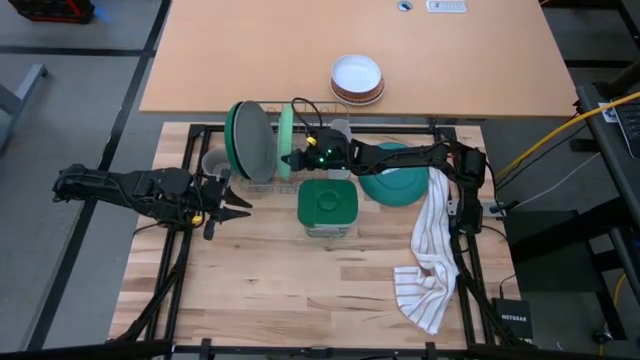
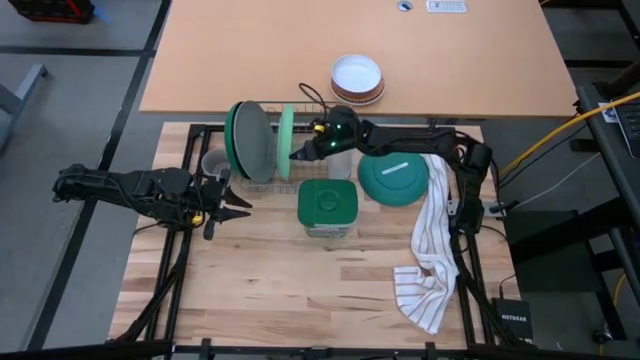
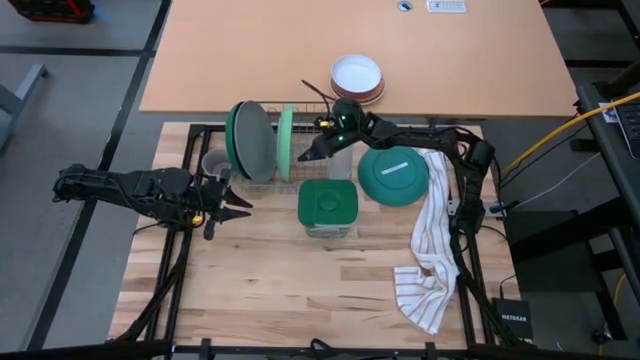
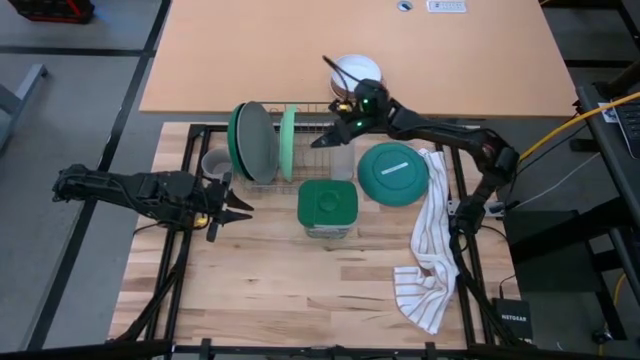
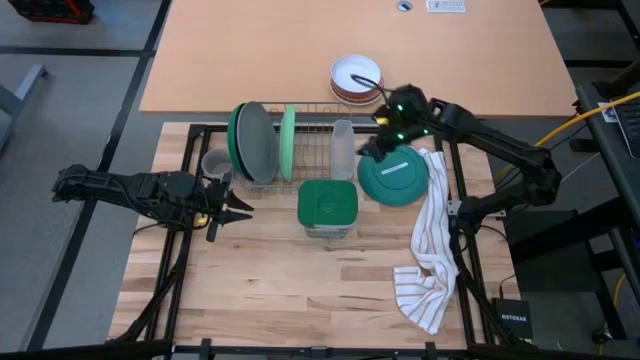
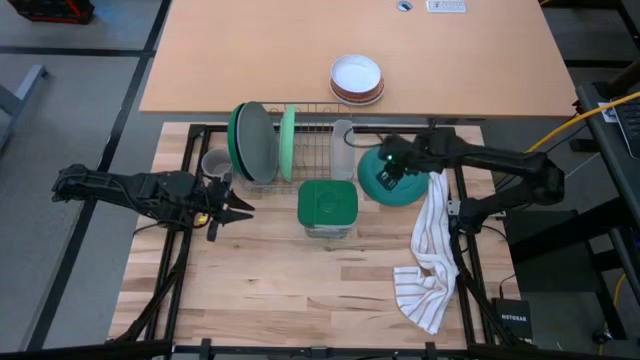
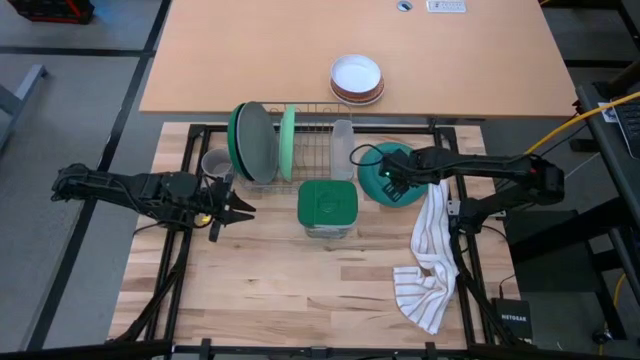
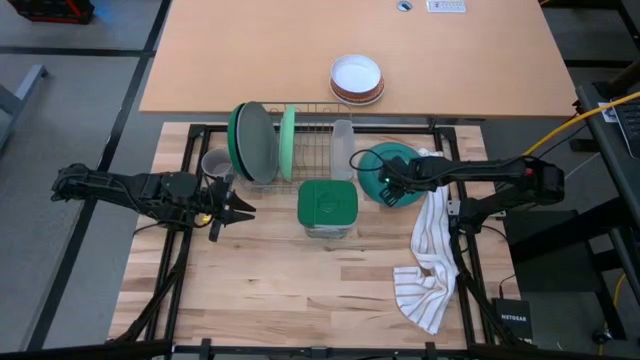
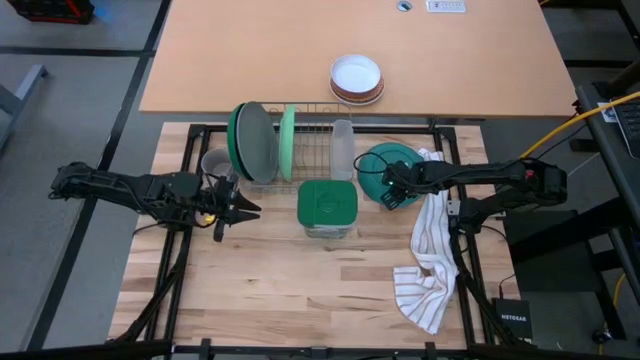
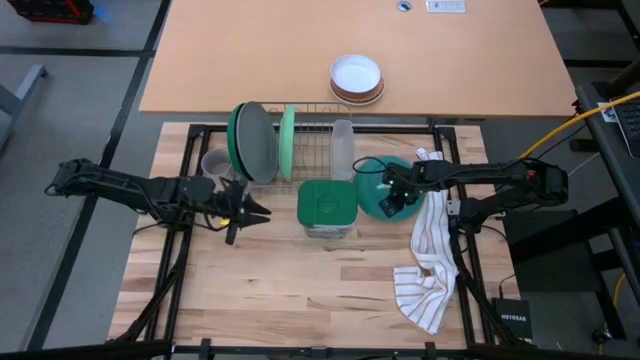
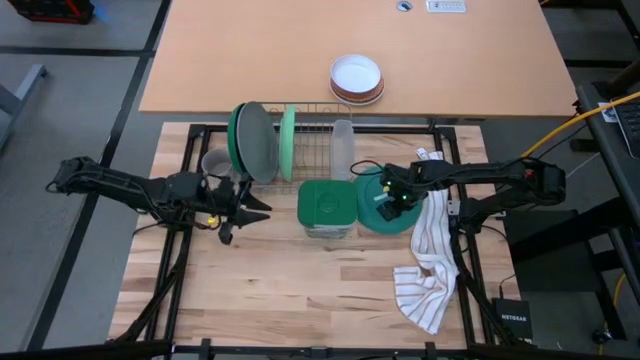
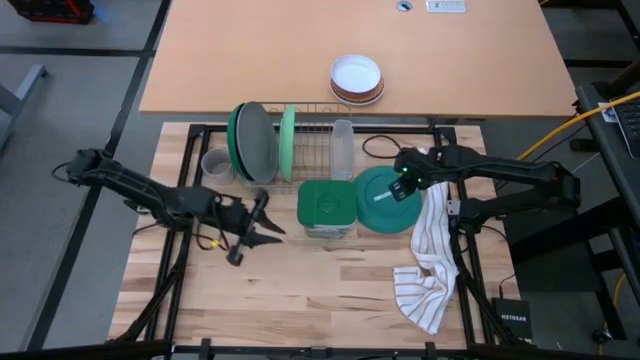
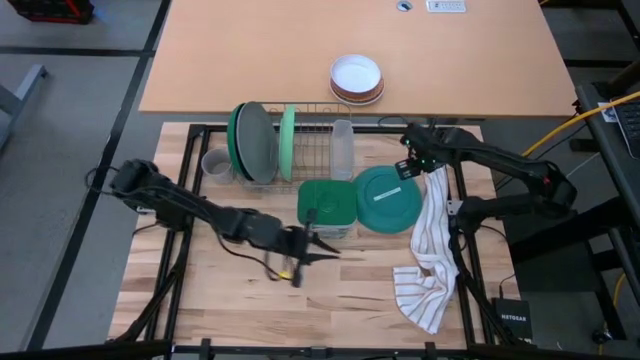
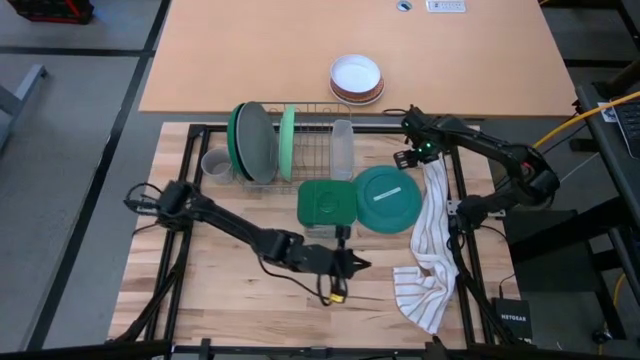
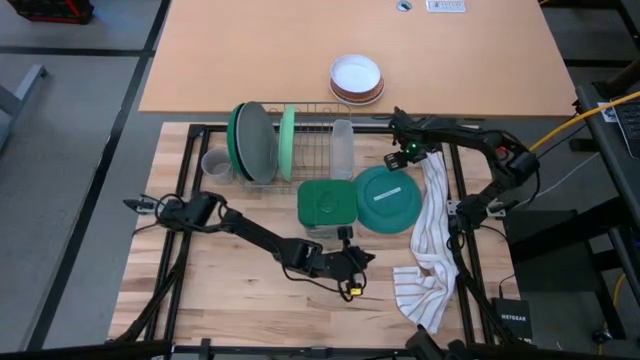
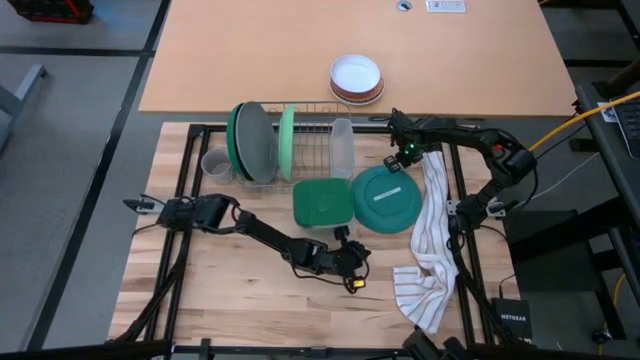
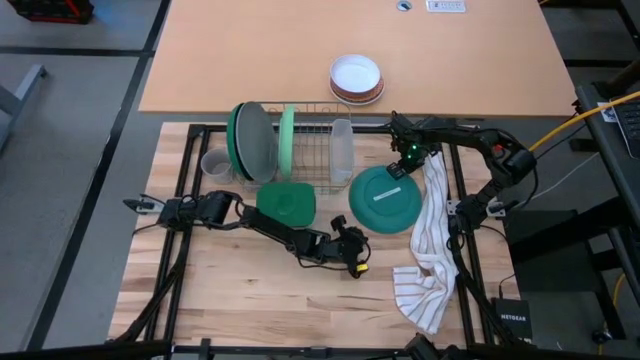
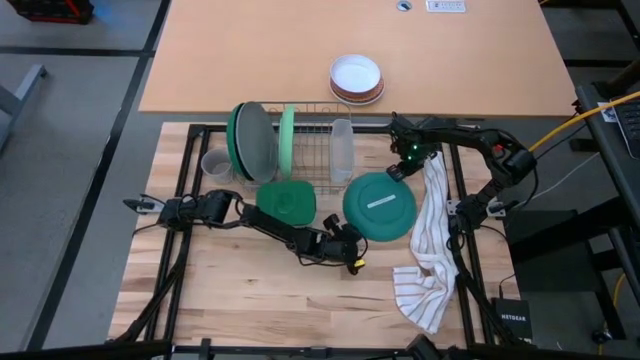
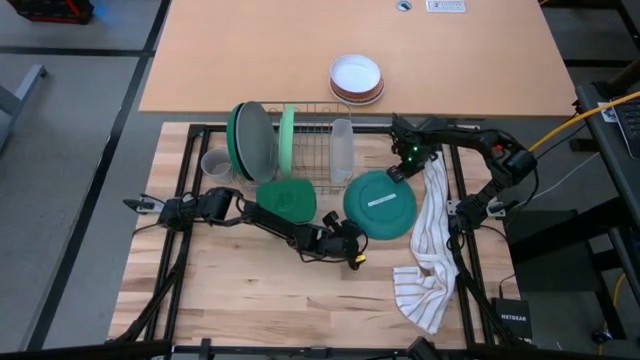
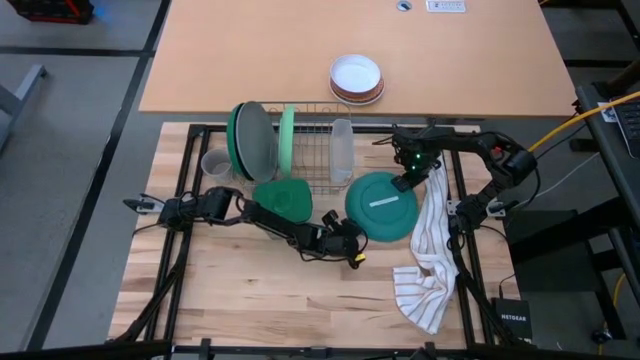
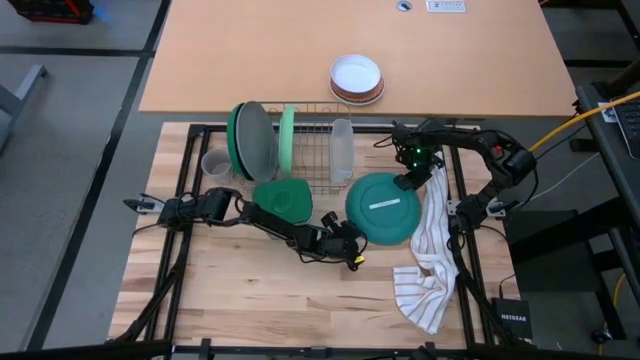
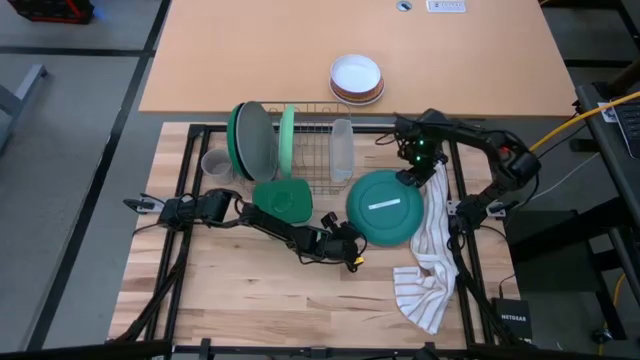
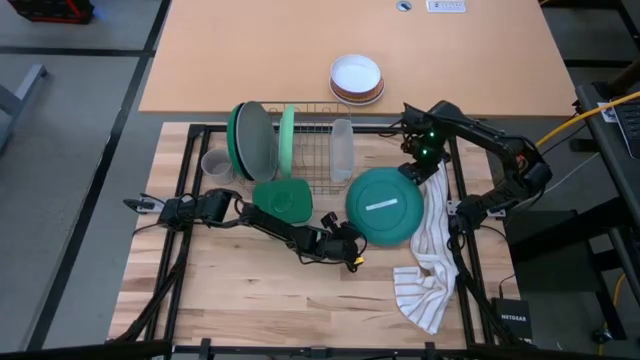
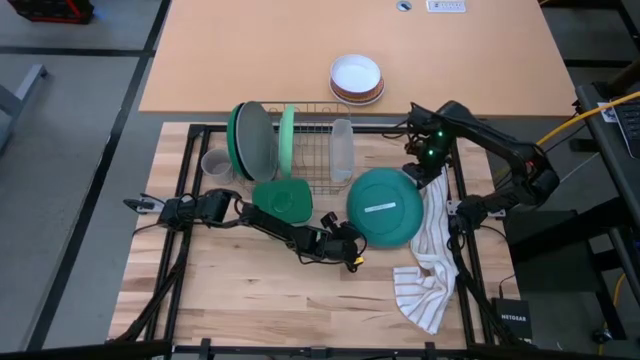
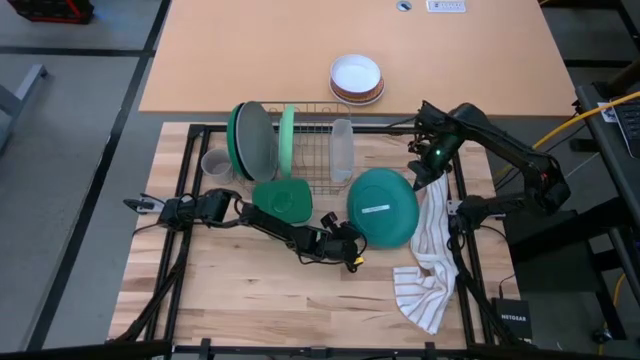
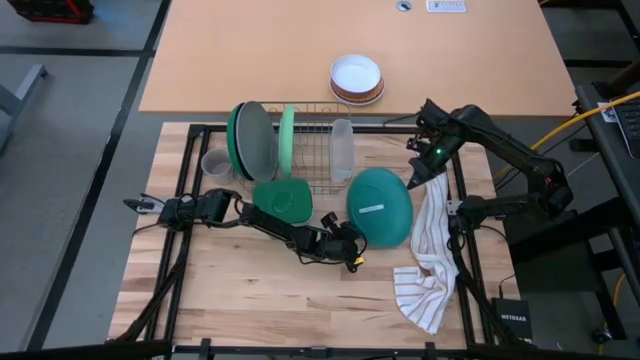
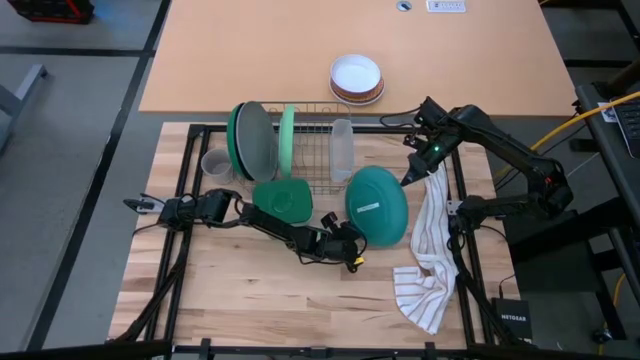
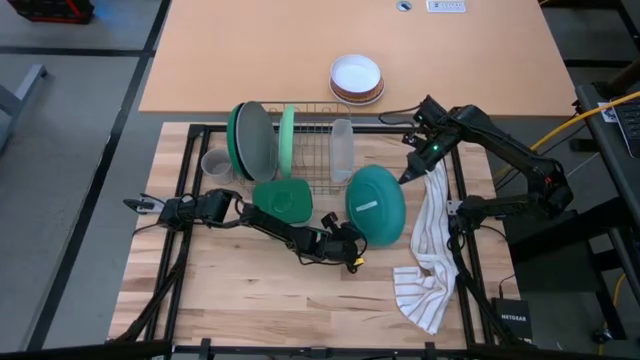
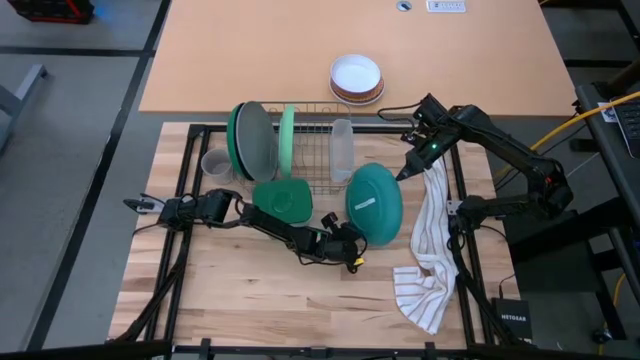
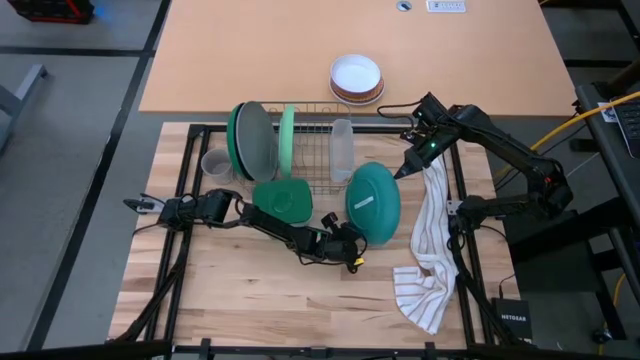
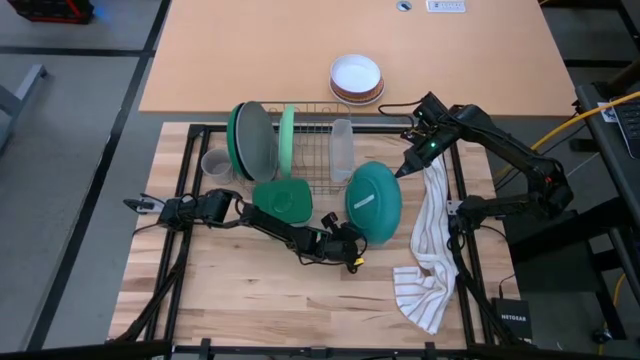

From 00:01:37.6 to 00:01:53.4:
Task: Sort dishes
Put the blue plate into the dish rack

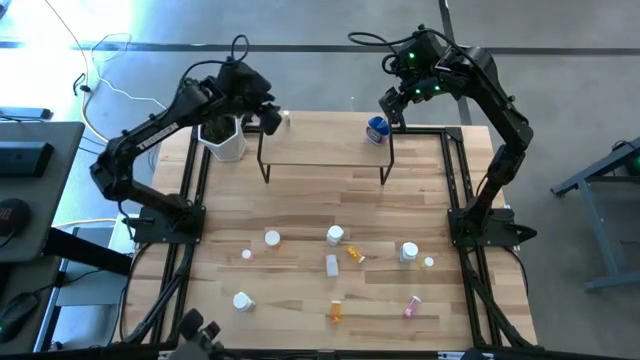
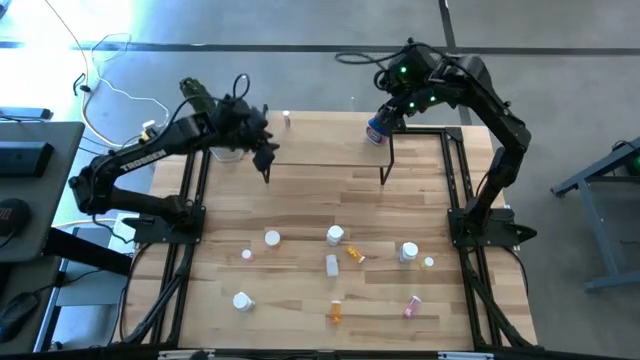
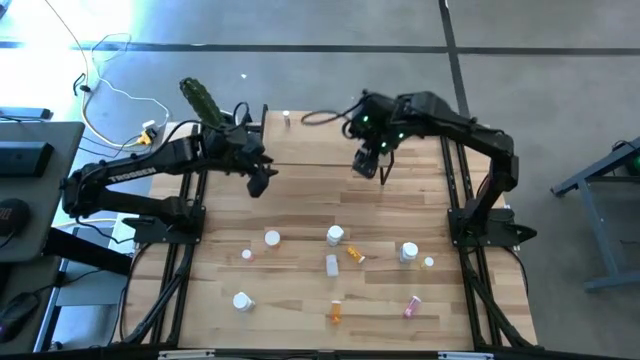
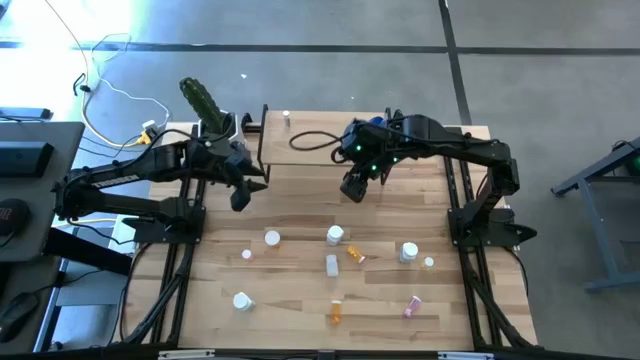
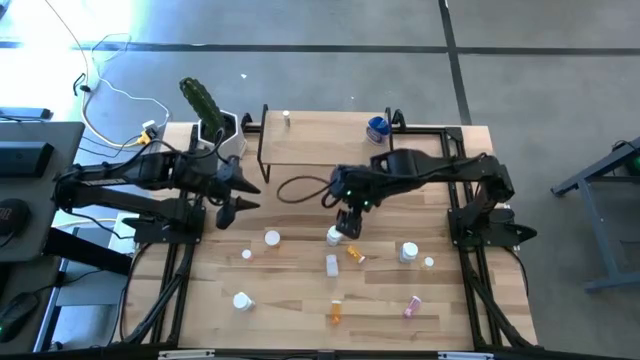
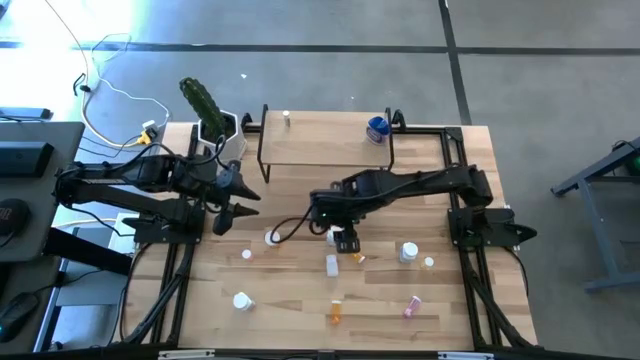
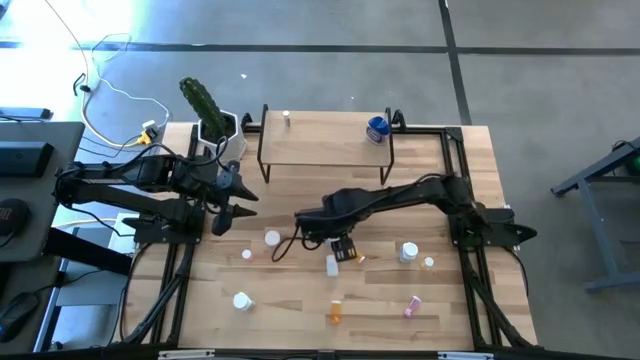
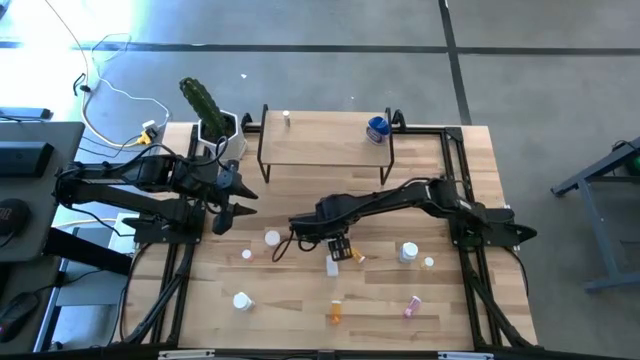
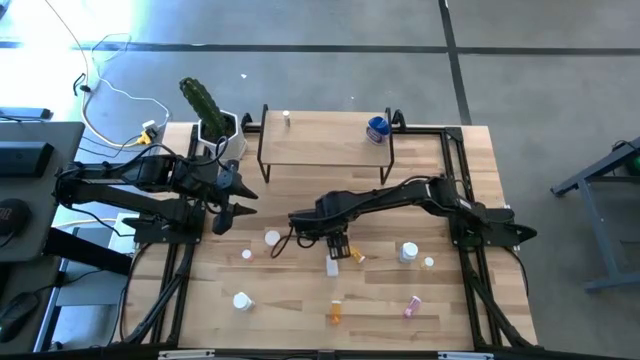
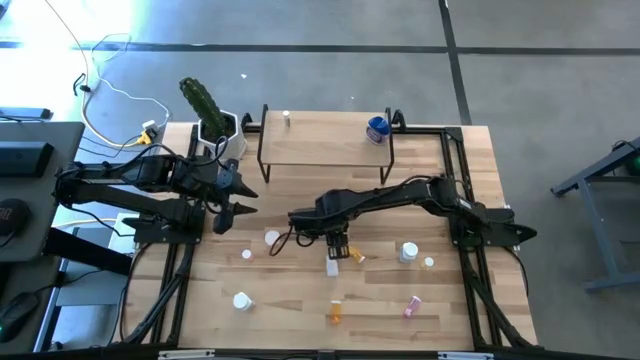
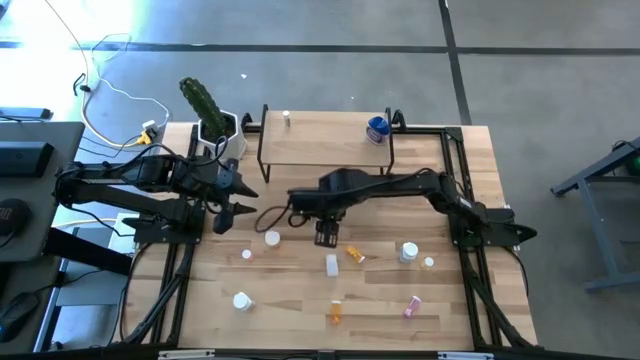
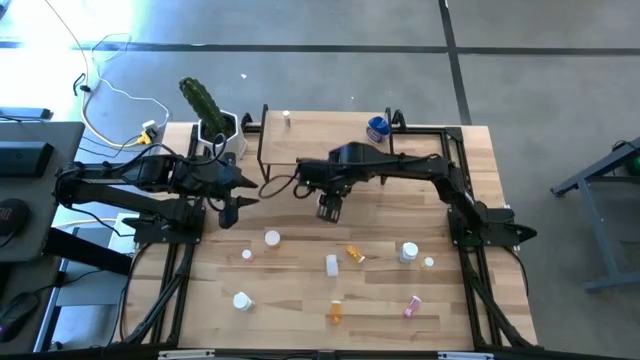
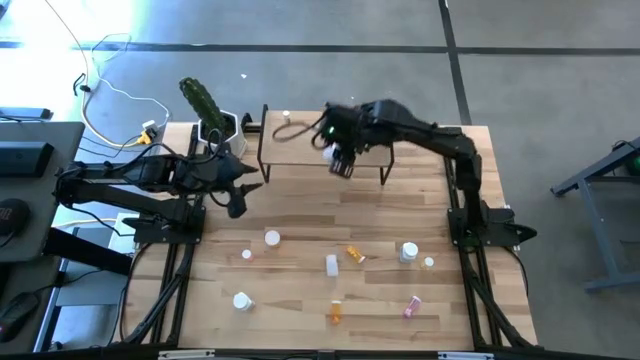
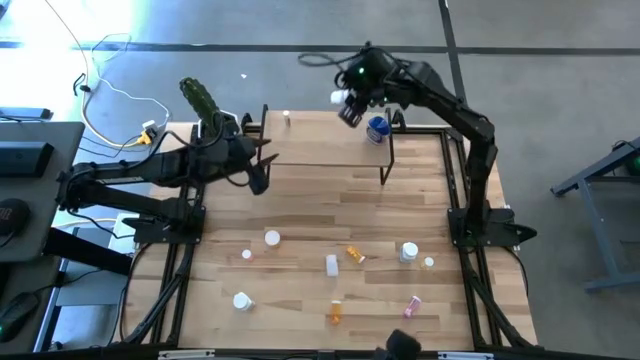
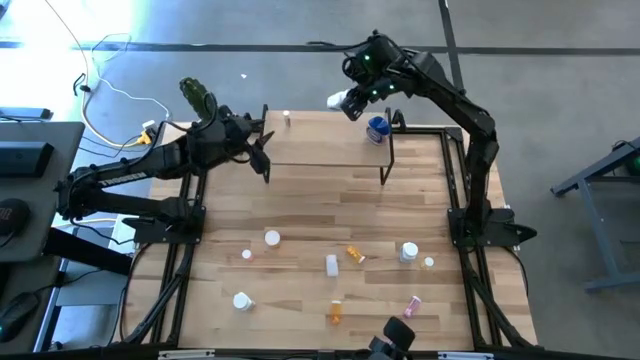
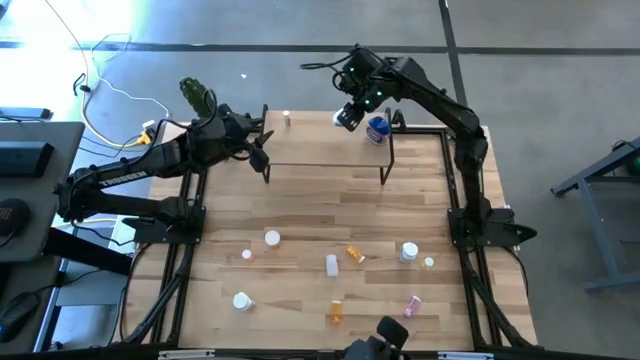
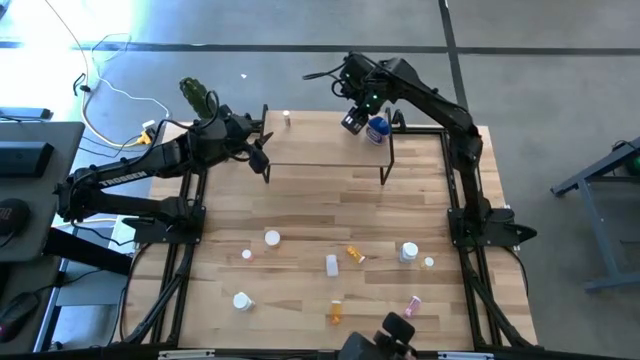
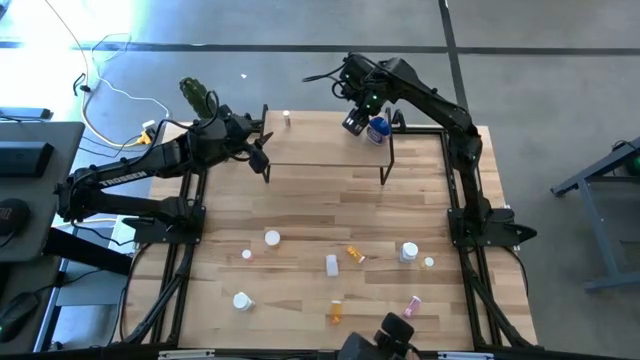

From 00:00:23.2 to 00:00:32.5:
Task: Pick and place medicine bottles onto shelf by color
Put the top blue pill bottle on the shelf
